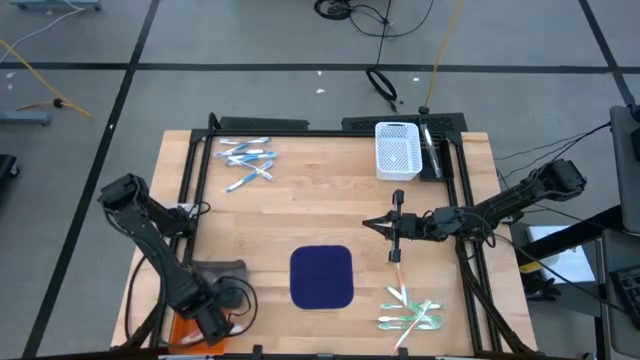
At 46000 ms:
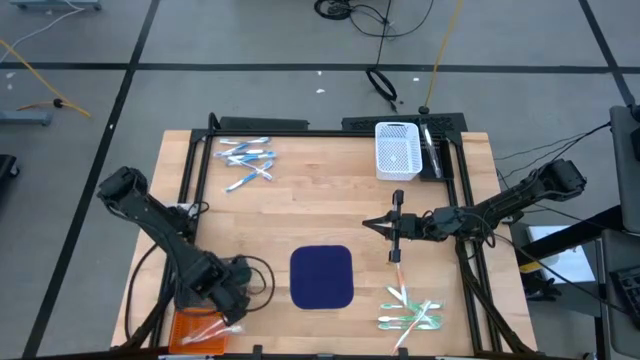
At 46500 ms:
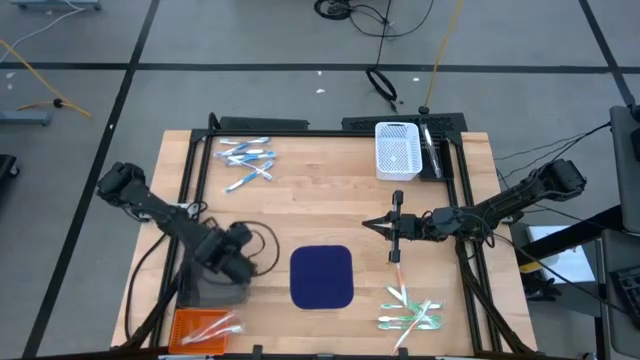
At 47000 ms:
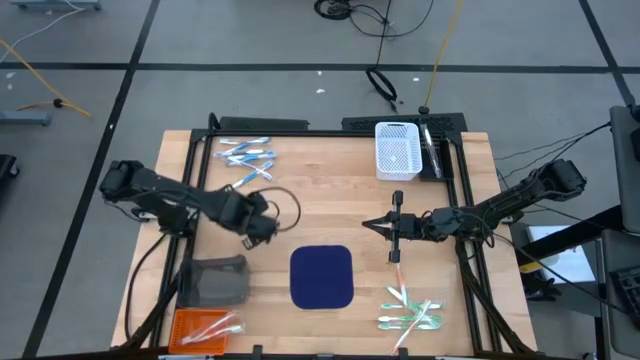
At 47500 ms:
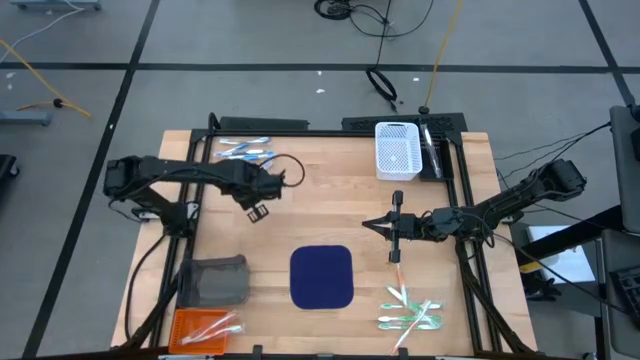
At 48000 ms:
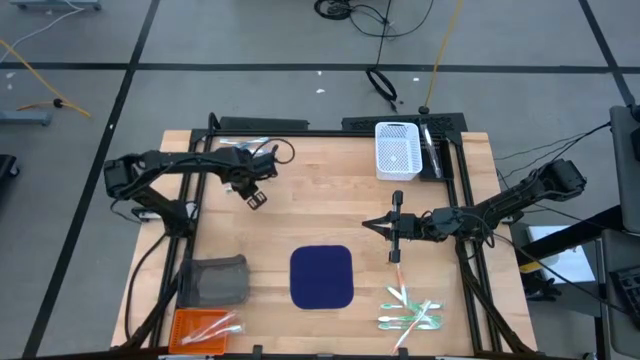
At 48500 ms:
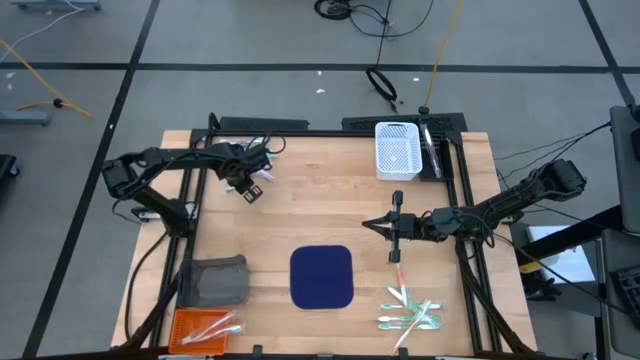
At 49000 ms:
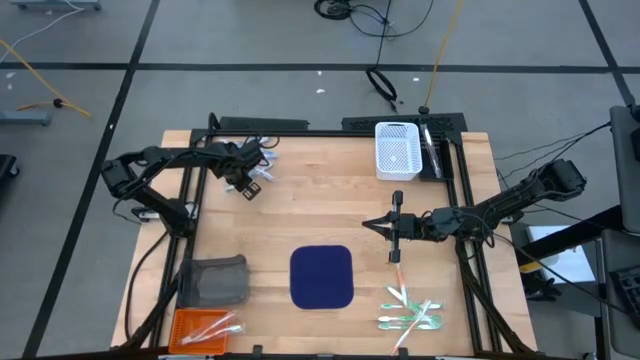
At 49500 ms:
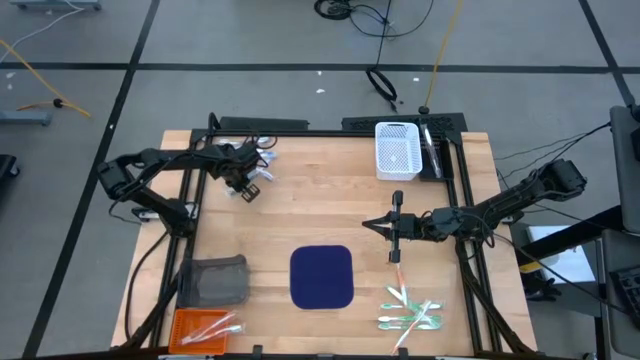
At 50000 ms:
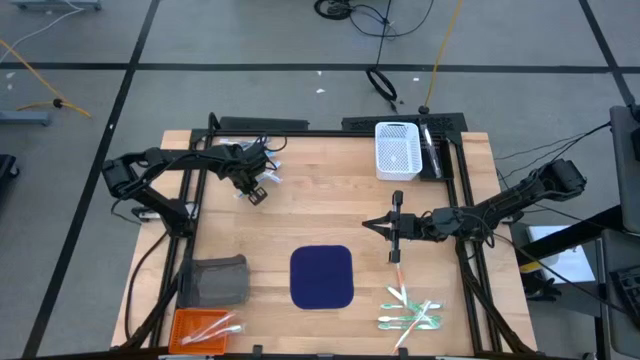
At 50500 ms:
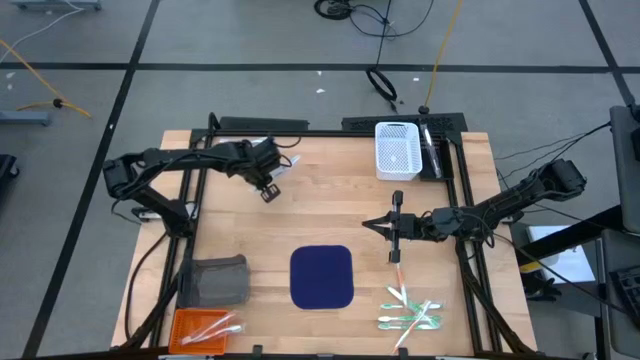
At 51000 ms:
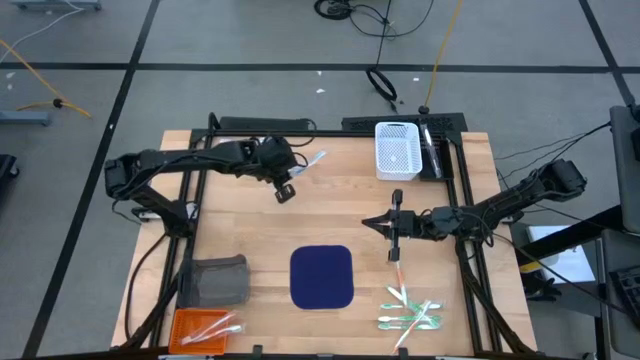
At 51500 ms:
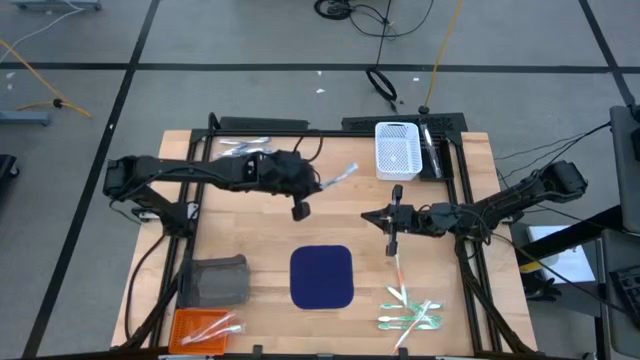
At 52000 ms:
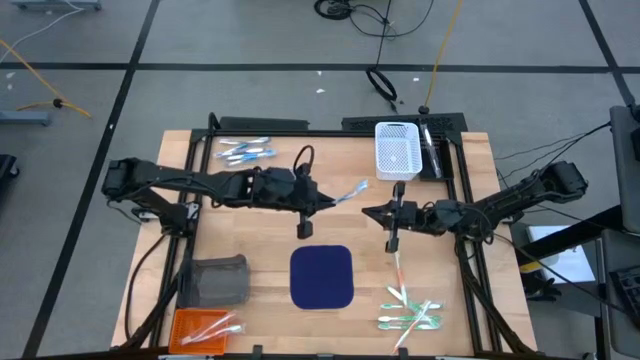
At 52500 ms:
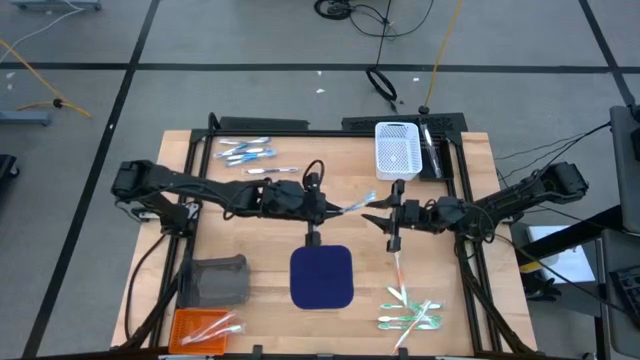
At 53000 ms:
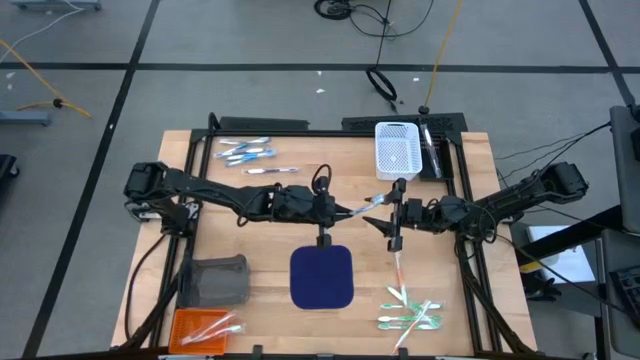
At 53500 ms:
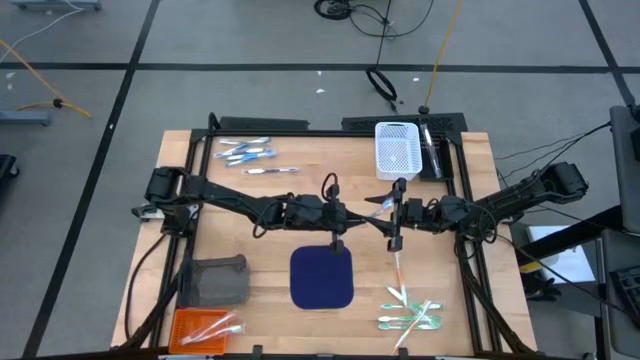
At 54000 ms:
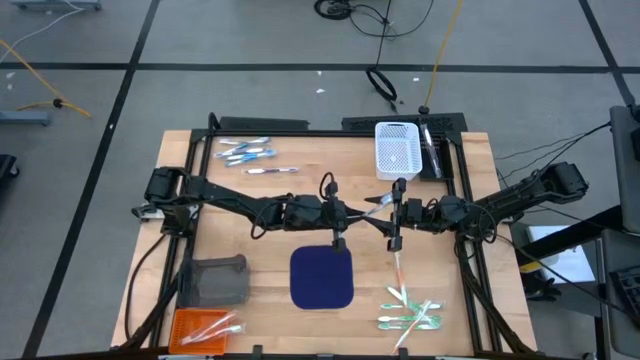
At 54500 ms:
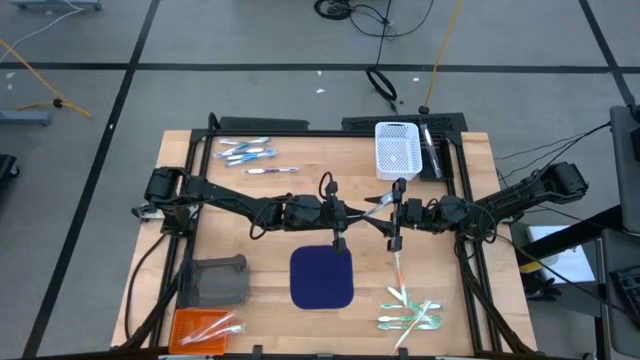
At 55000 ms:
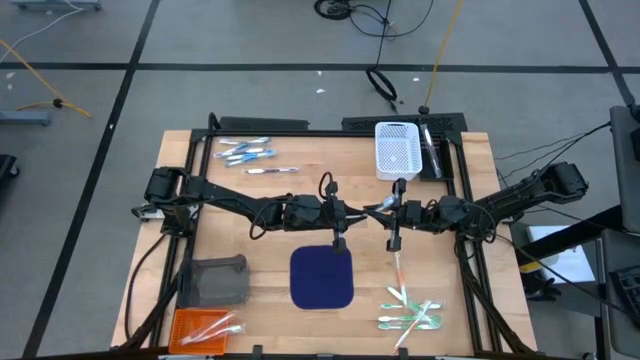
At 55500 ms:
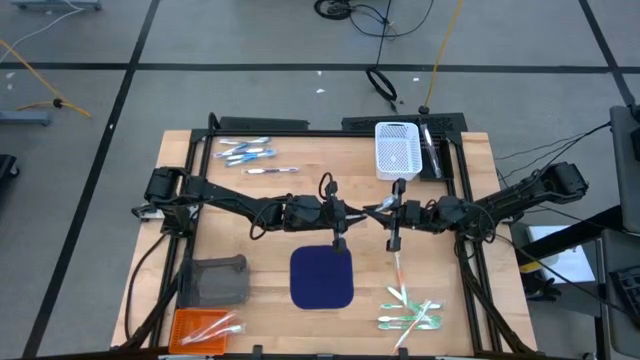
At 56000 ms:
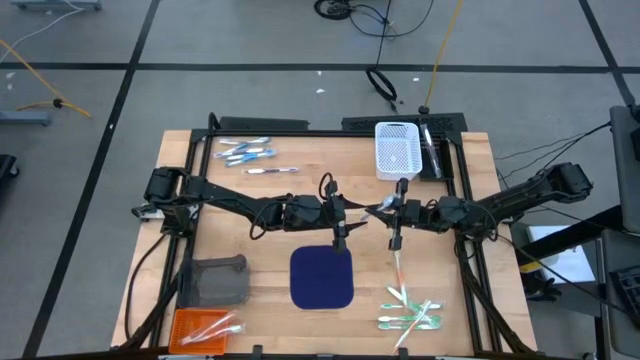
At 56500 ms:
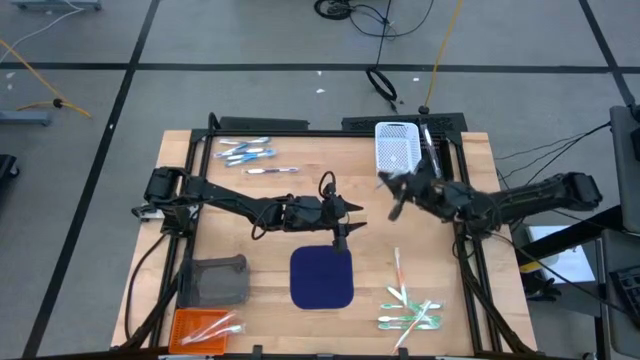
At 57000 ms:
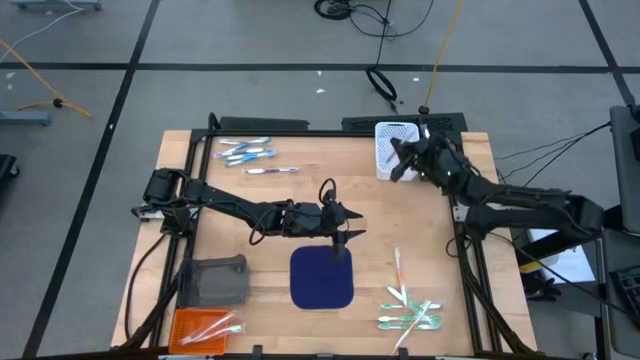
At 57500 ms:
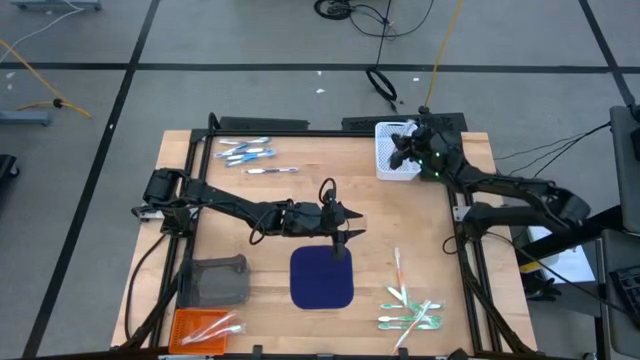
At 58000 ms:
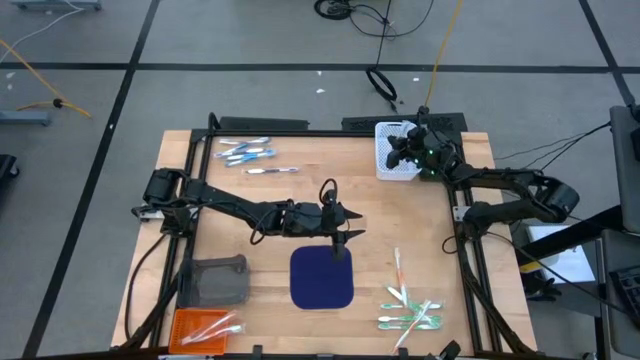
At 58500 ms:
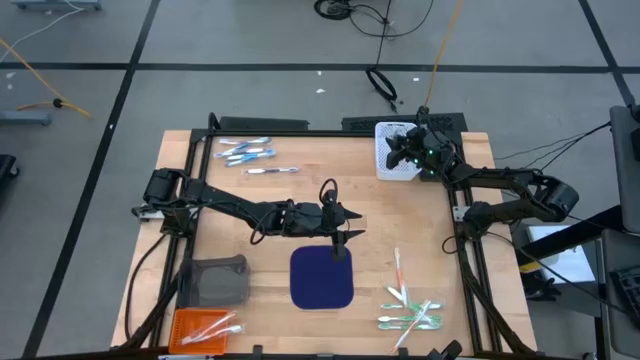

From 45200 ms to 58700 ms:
Task: Pick & Place Toothbrushes
Put the blue toothbrush into the white bin

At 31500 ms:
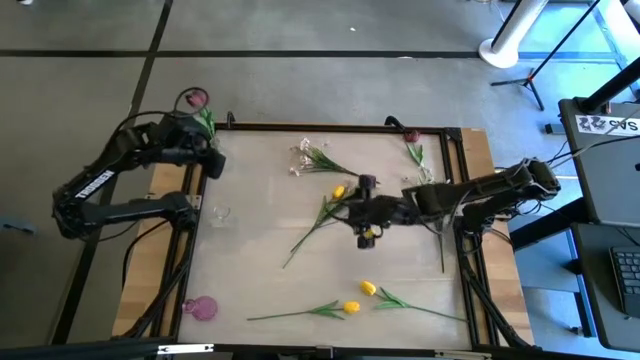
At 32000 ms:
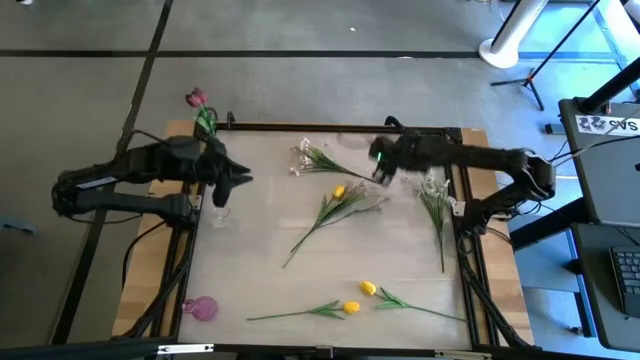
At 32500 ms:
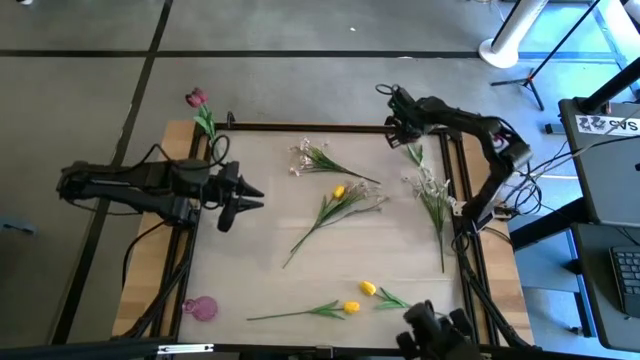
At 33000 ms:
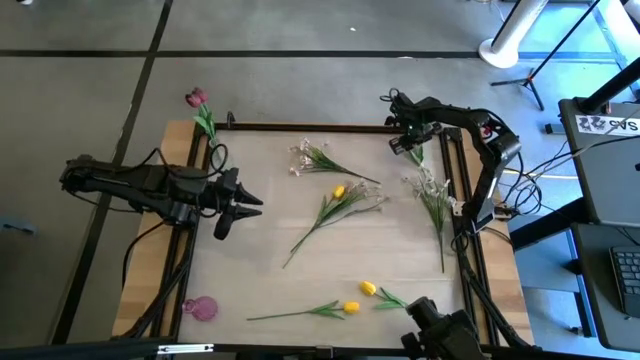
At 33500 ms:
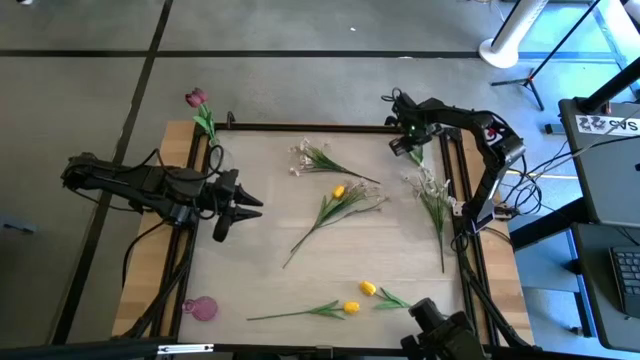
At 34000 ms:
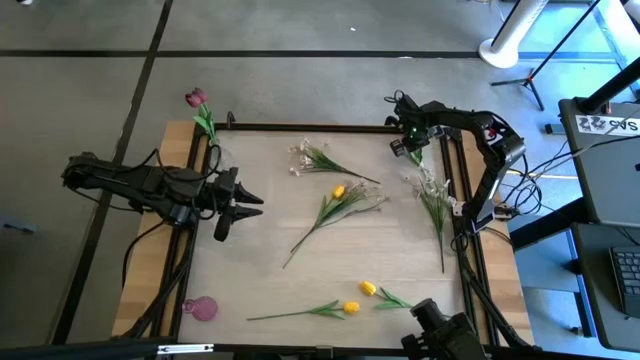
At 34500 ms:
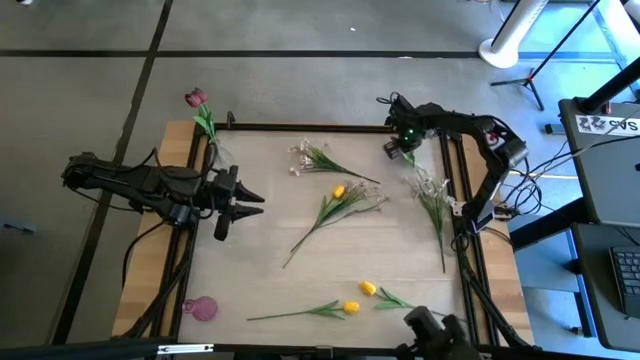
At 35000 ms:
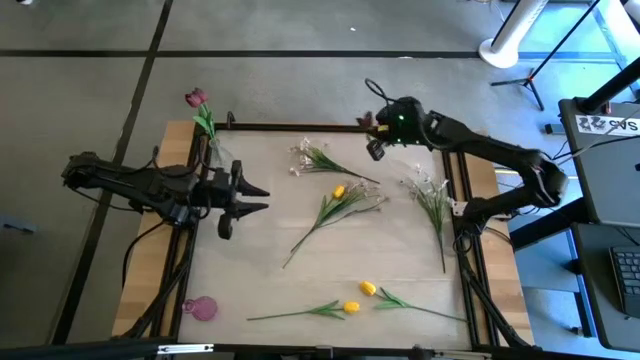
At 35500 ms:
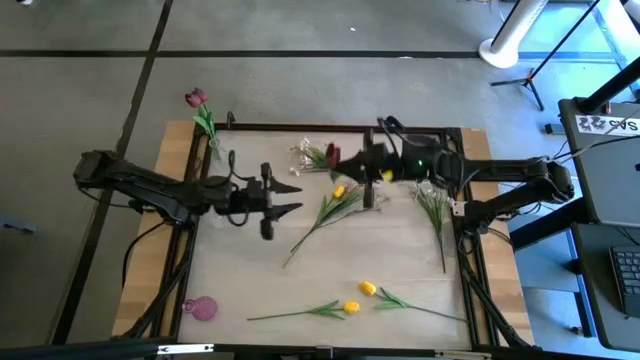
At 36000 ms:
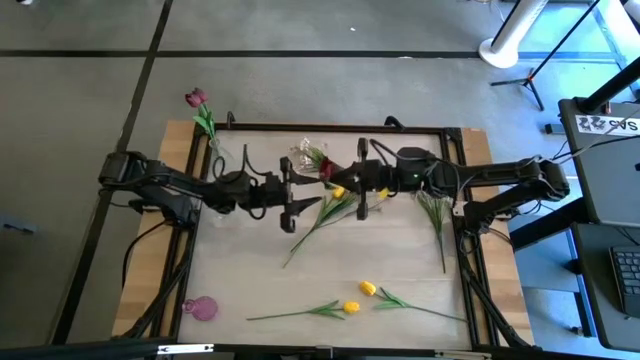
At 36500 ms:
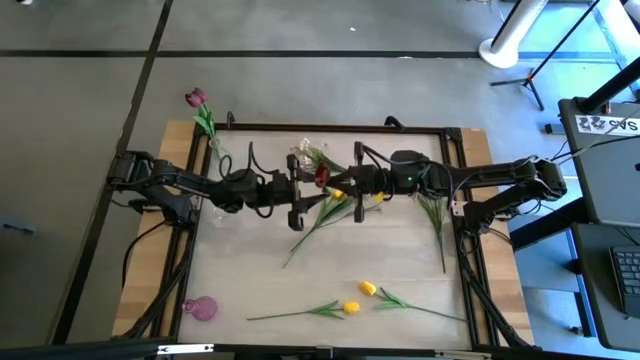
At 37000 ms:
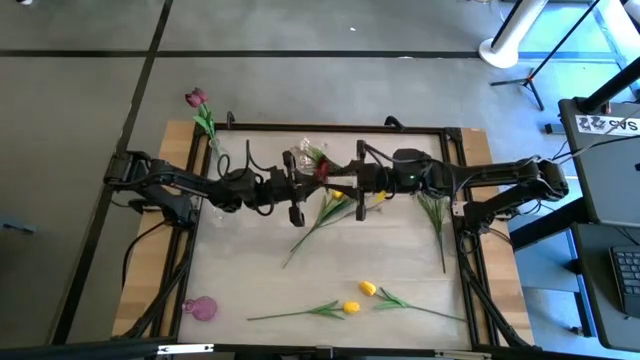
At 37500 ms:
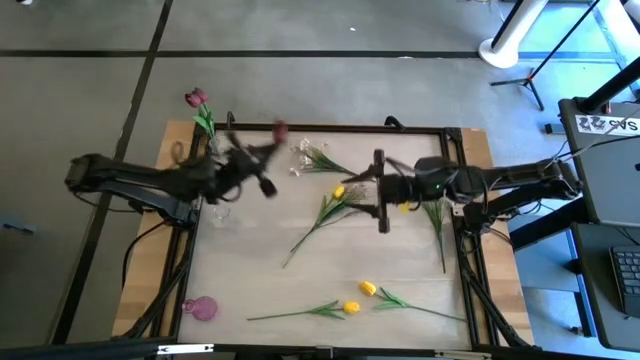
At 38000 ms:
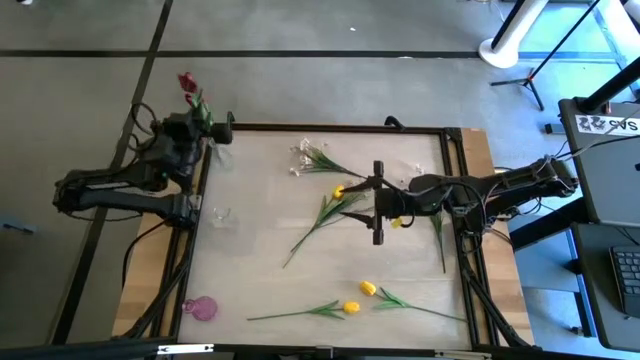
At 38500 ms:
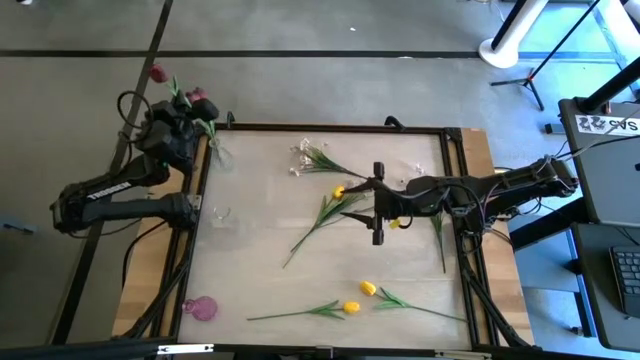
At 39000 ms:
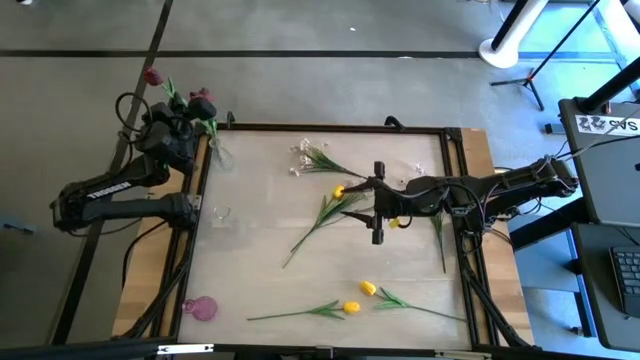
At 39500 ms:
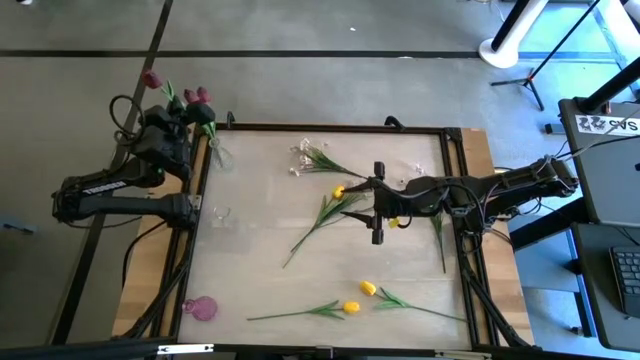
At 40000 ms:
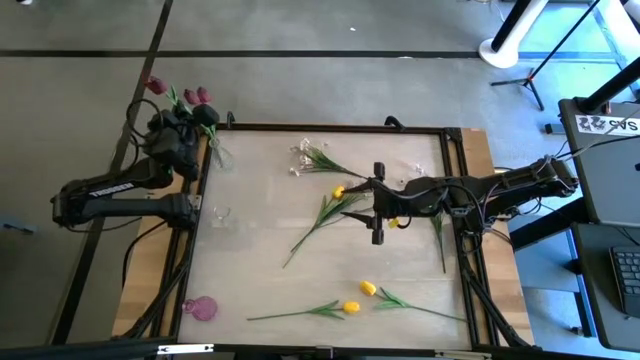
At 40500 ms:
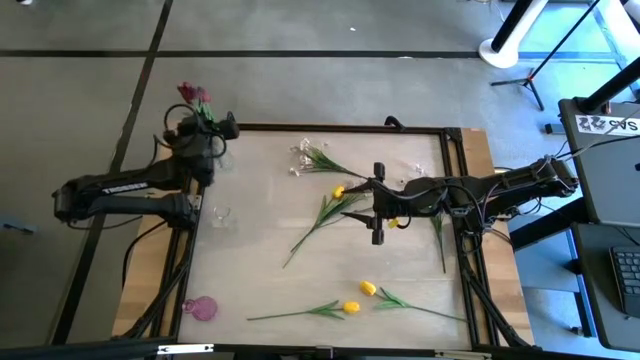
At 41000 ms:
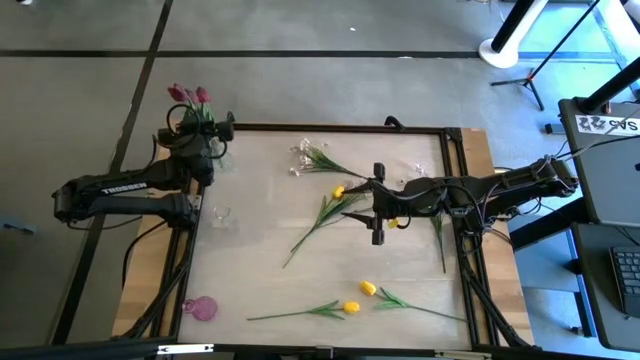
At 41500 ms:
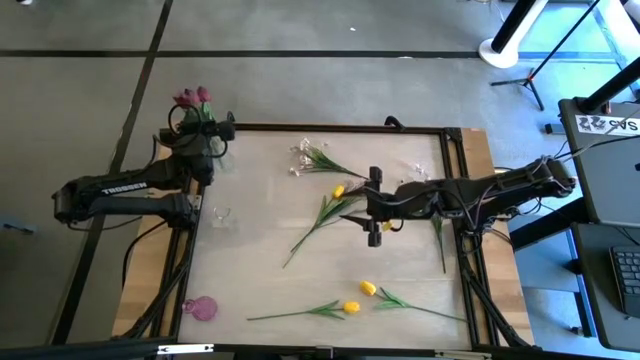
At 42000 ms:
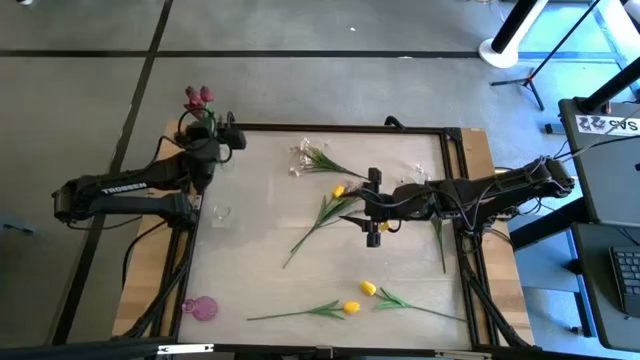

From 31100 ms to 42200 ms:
Task: Sort flowers into vase by color
Put the red flower into the top transparent vase
